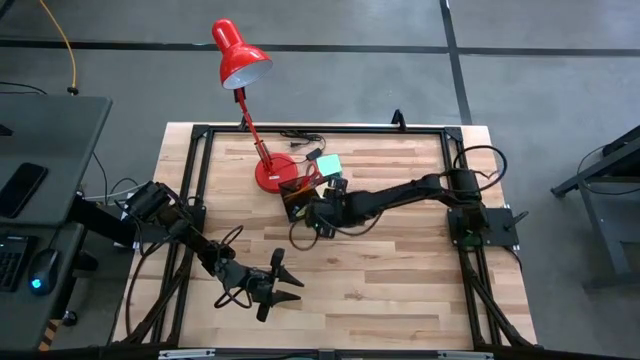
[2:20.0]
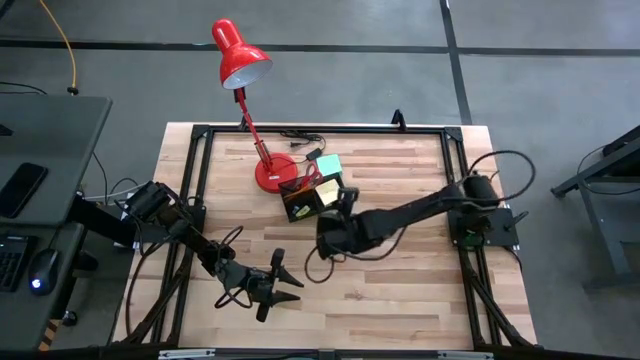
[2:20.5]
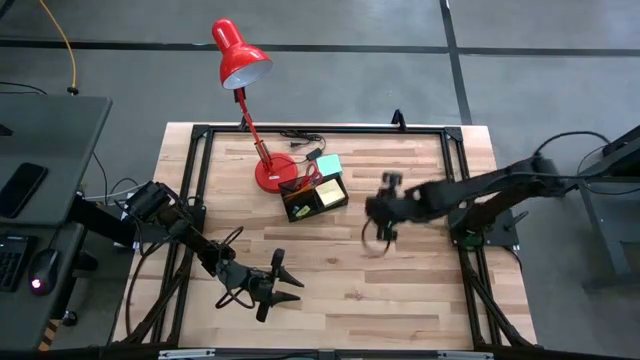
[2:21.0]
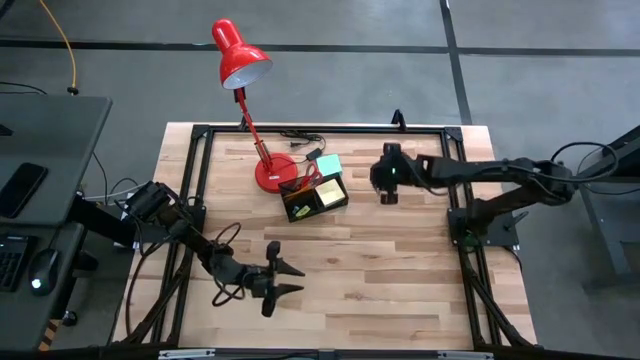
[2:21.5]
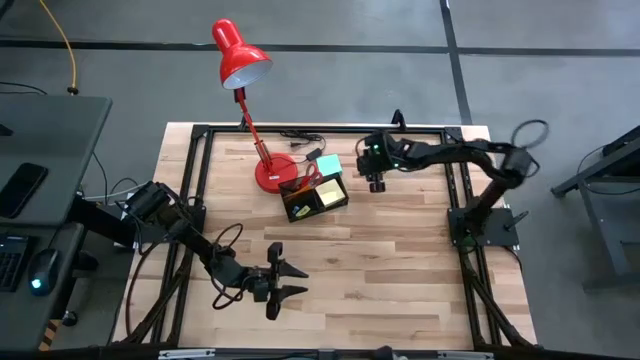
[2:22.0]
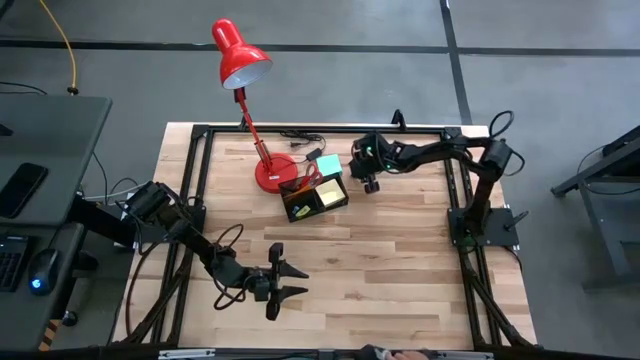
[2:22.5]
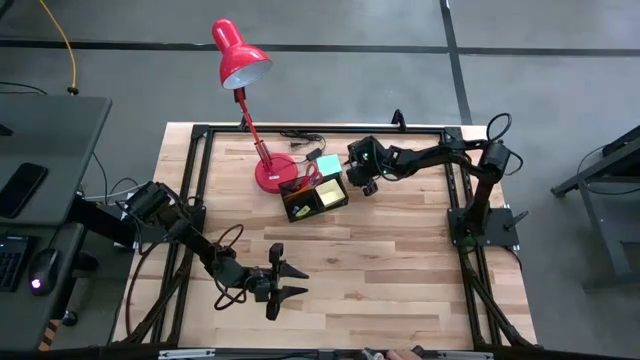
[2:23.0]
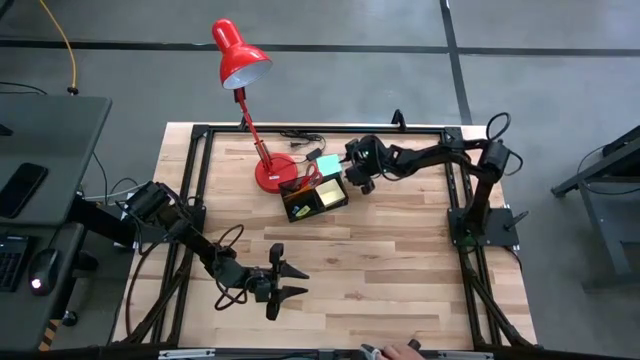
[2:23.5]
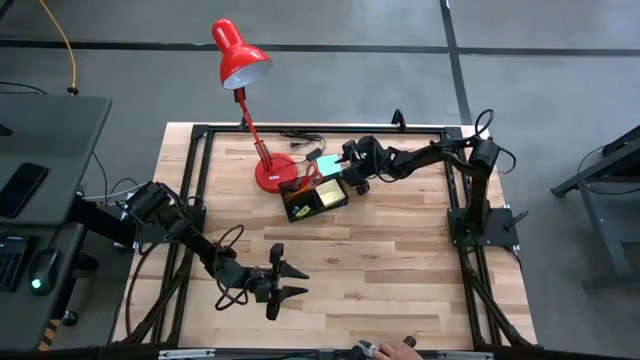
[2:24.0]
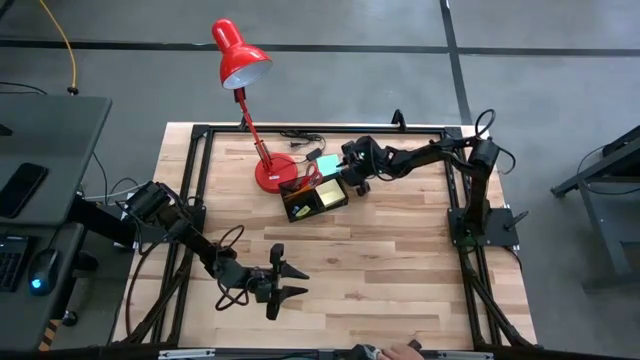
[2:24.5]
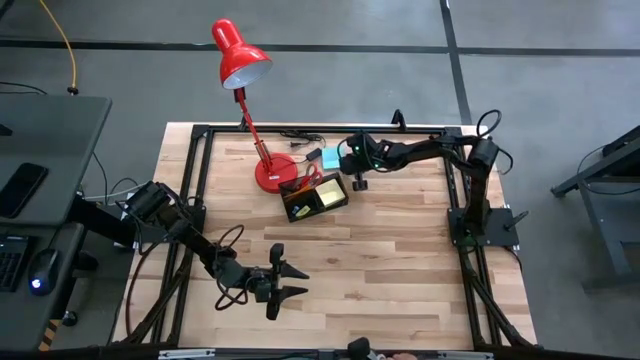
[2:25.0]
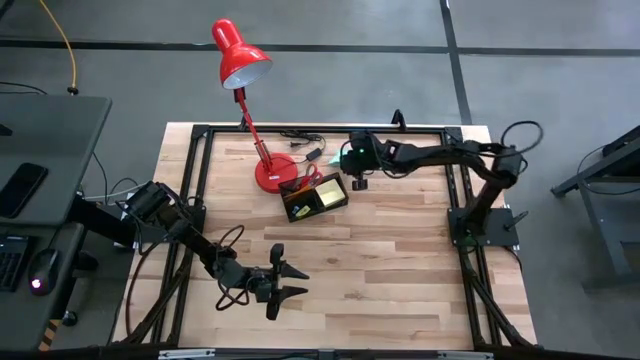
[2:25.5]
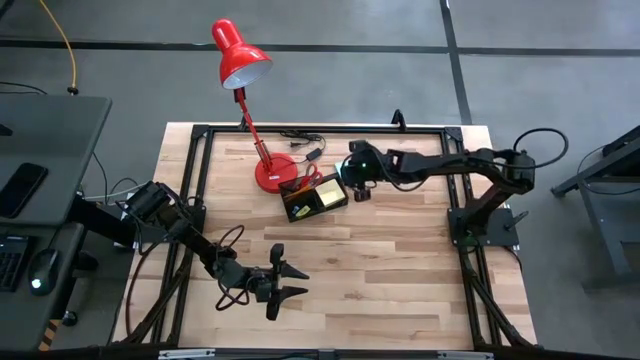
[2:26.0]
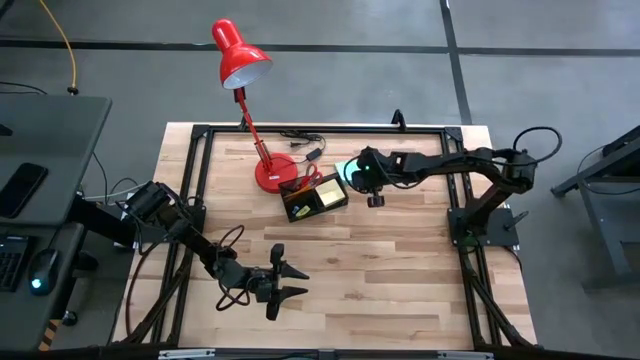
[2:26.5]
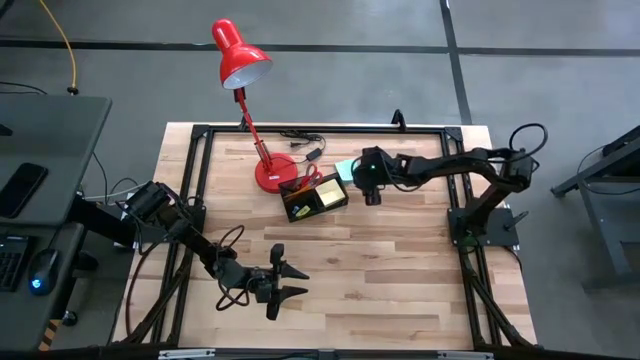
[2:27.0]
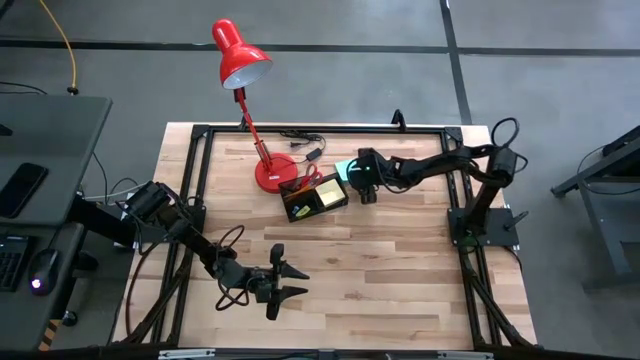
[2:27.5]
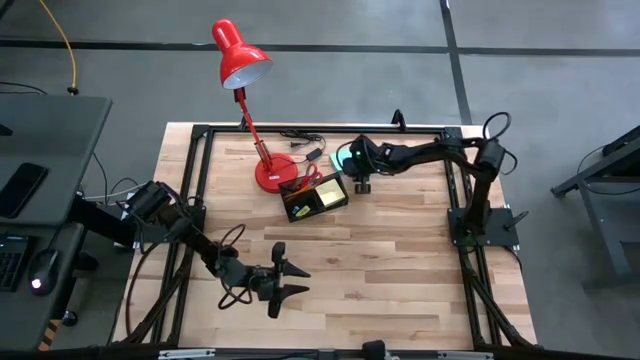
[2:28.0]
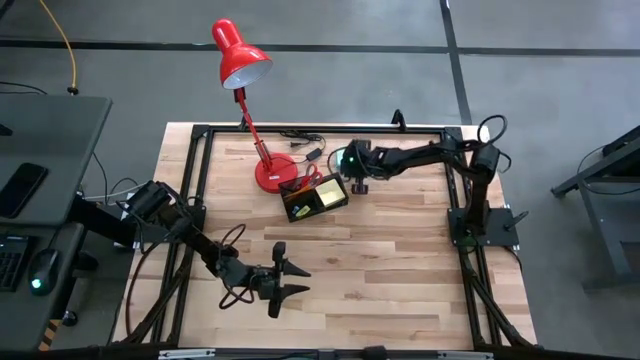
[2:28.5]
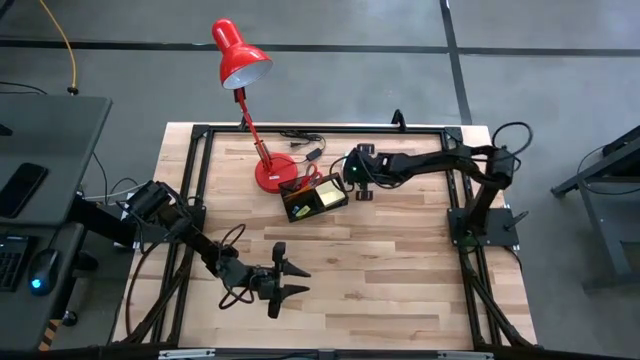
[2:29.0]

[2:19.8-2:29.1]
Task: Pick and place office supplies into organizer
Put the blue sticky notes into the desk organizer

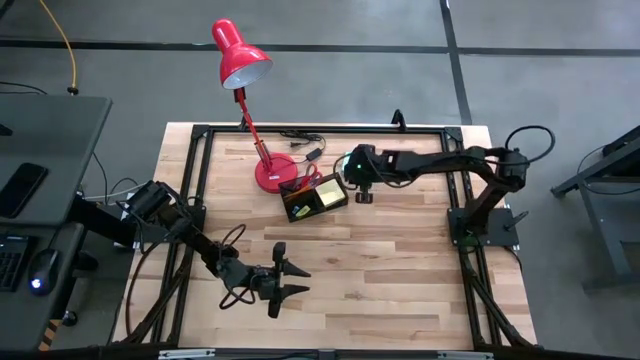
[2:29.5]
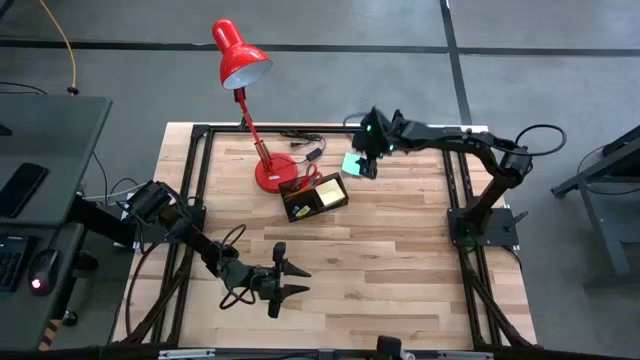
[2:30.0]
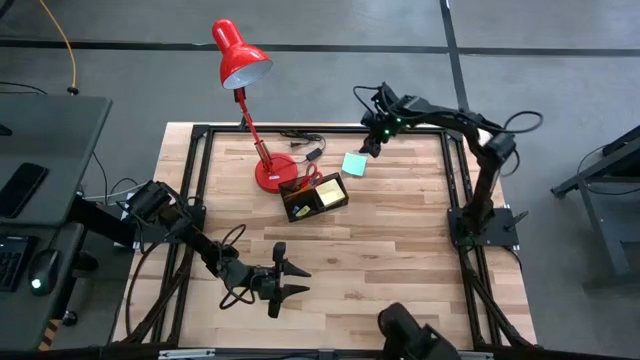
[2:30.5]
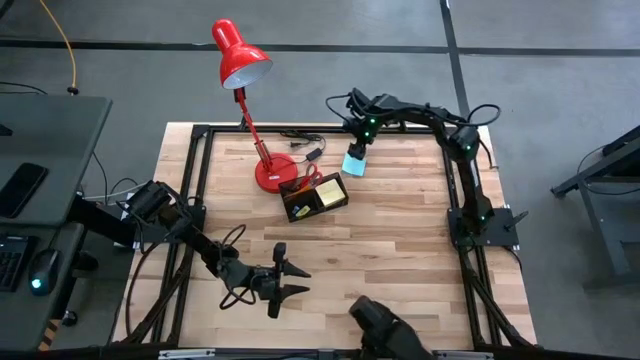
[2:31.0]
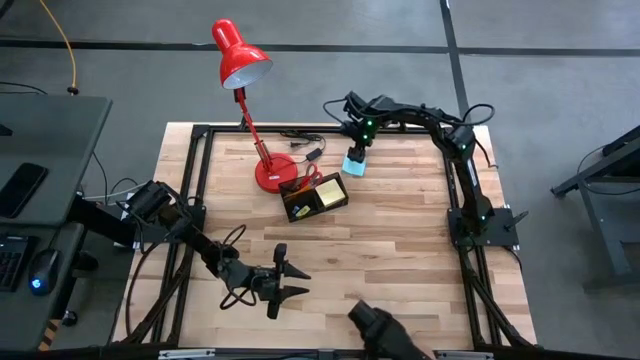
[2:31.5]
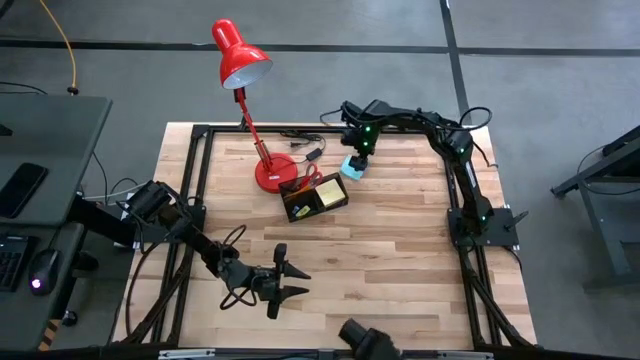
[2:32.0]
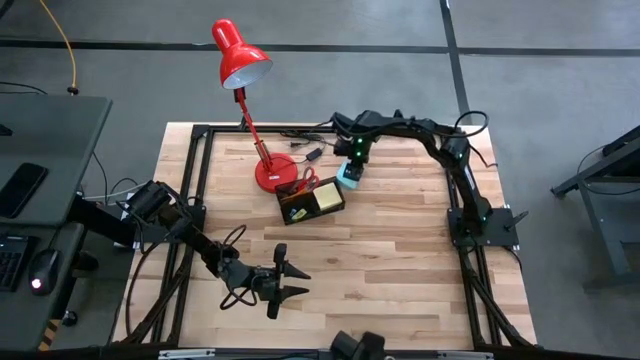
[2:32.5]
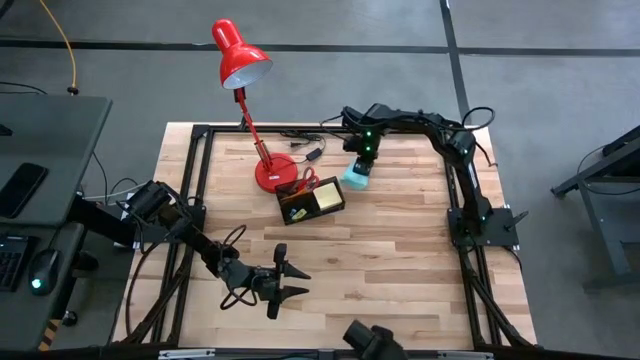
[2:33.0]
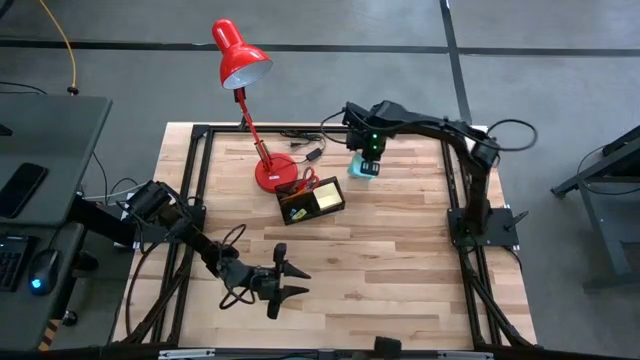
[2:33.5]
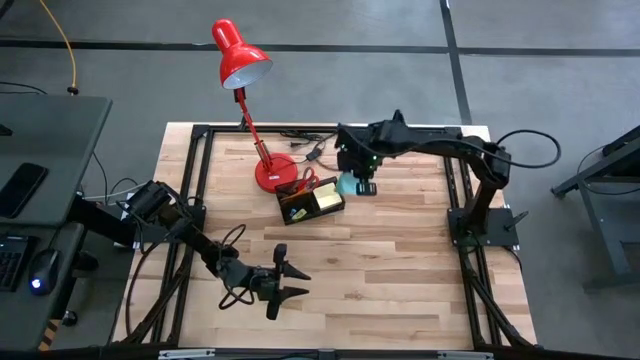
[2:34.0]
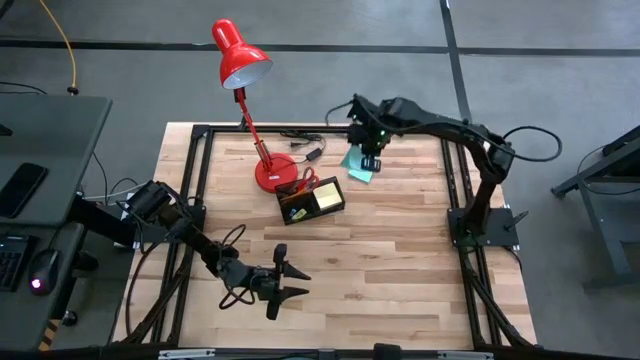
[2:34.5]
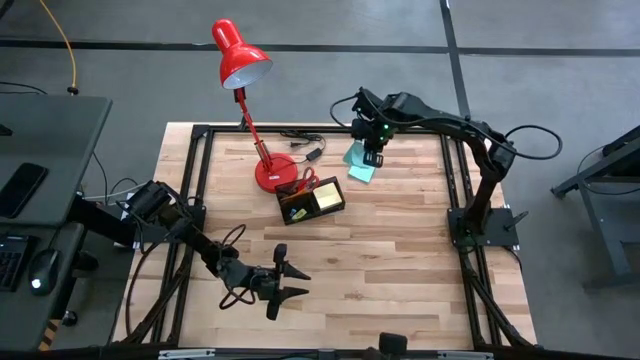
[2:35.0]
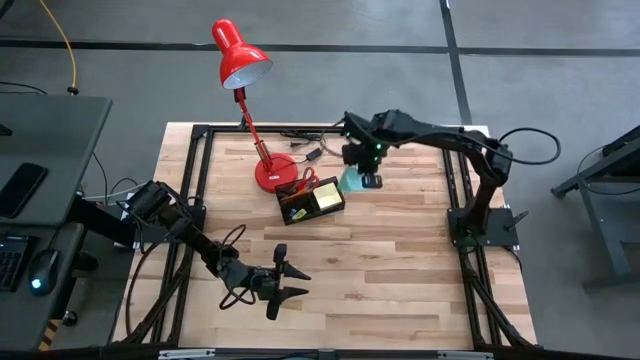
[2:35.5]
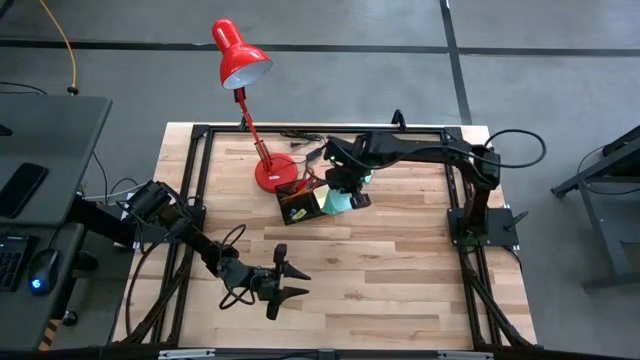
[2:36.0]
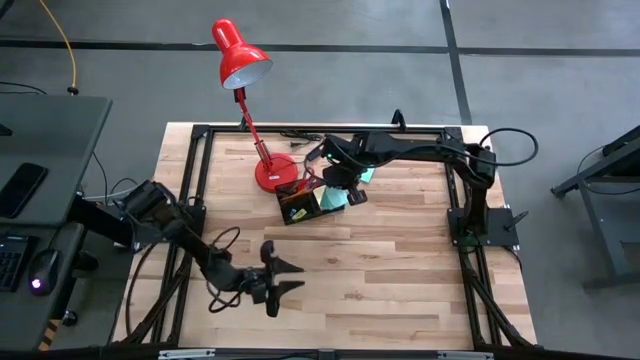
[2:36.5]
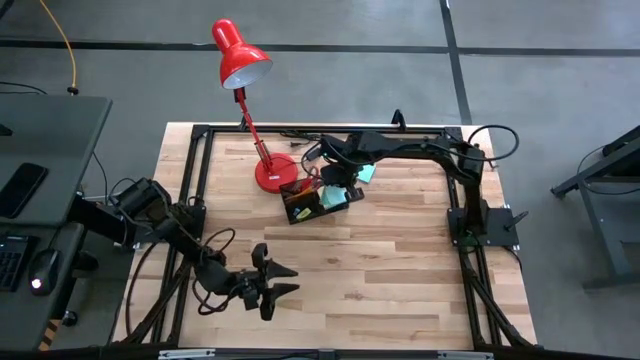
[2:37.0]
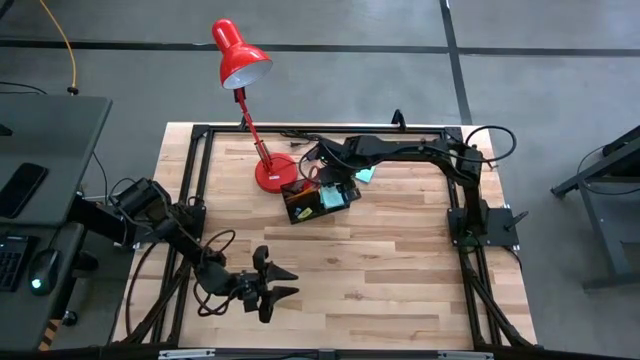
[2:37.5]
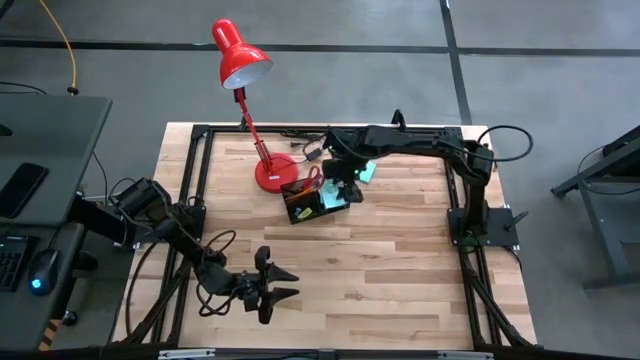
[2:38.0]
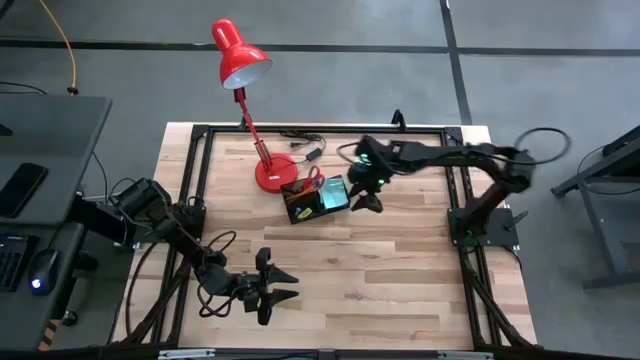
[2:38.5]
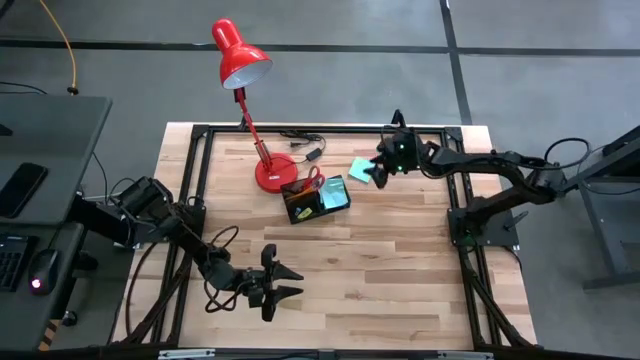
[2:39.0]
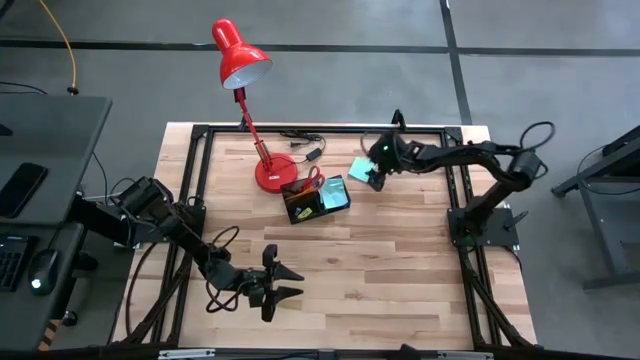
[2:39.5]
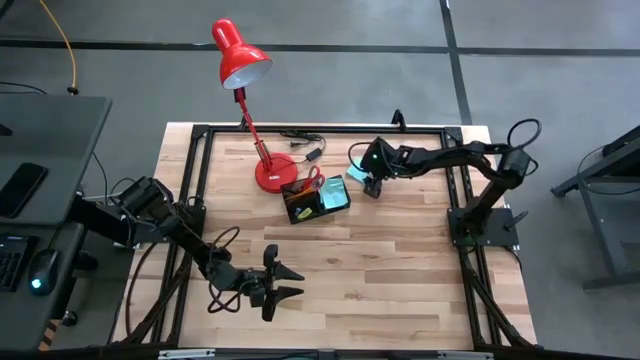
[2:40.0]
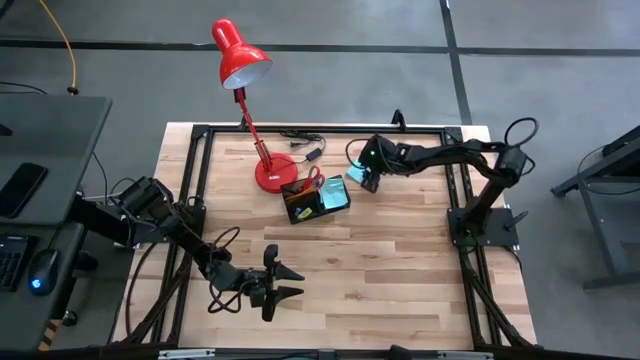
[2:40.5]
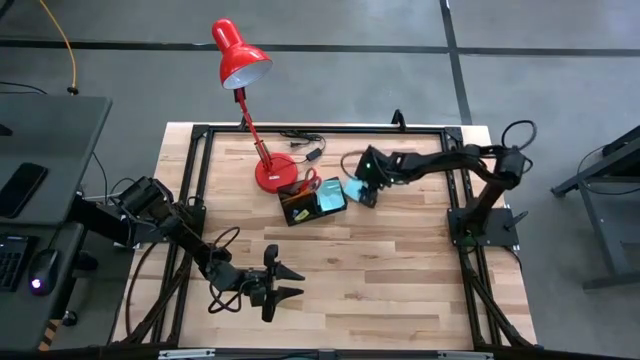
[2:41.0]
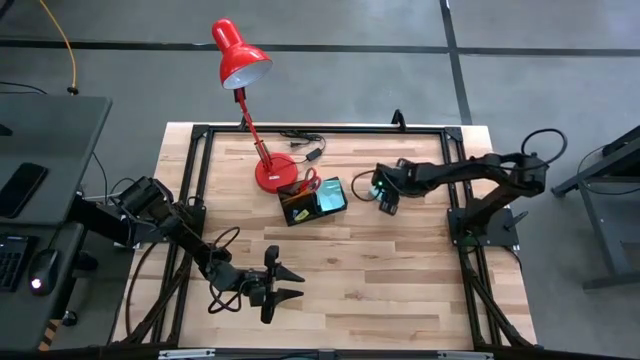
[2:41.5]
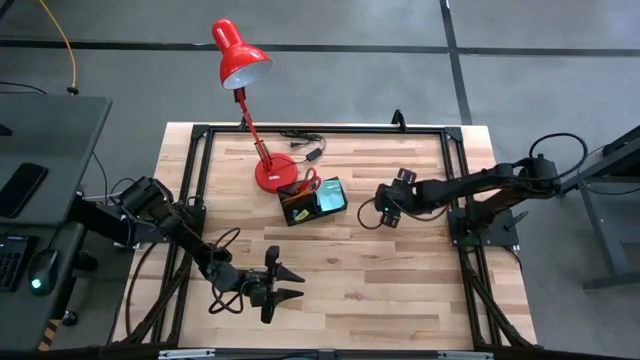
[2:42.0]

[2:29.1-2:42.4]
Put the blue sticky notes into the desk organizer
